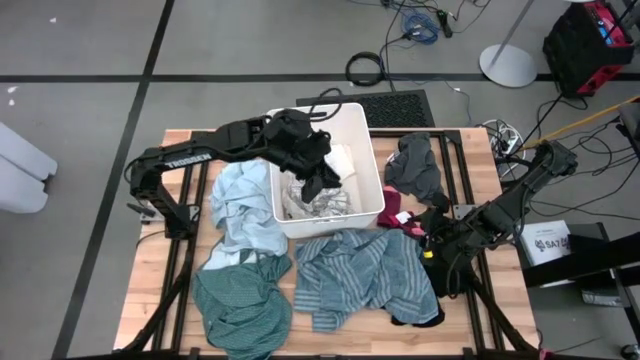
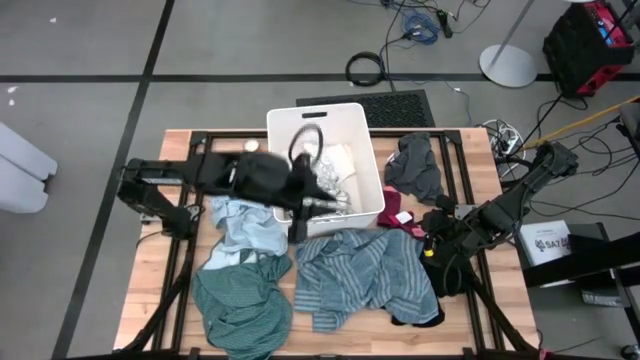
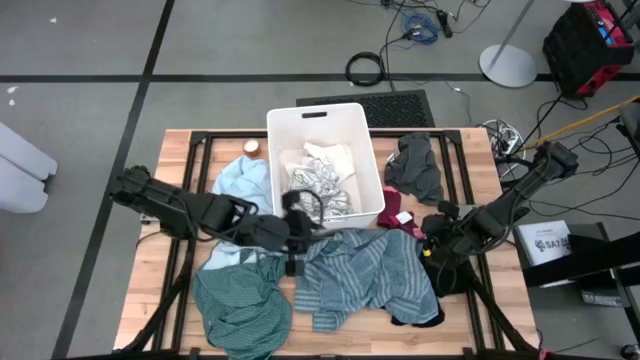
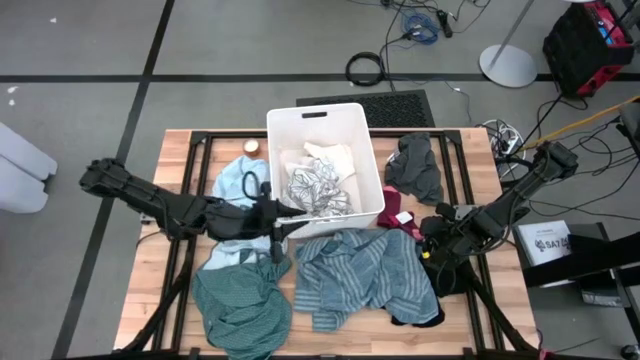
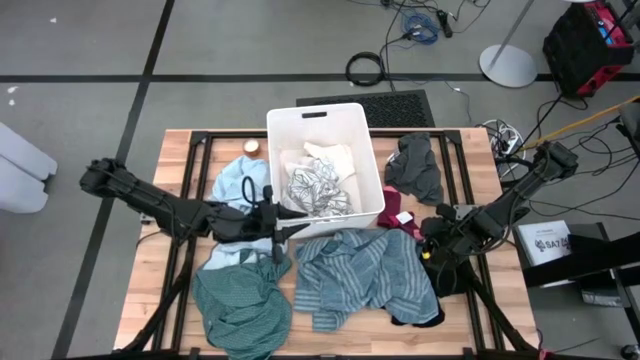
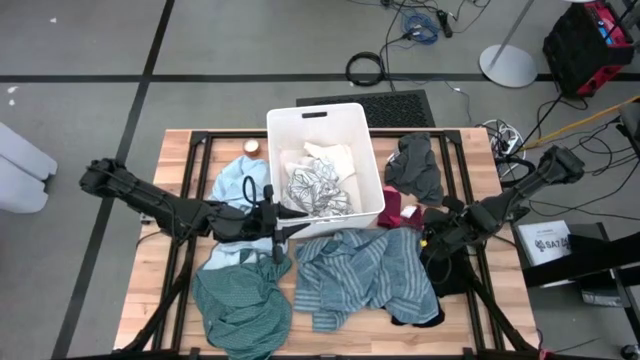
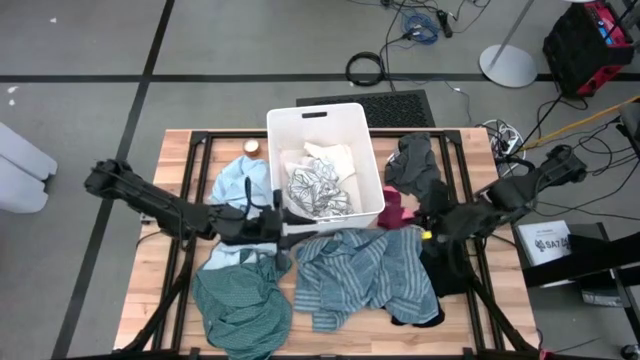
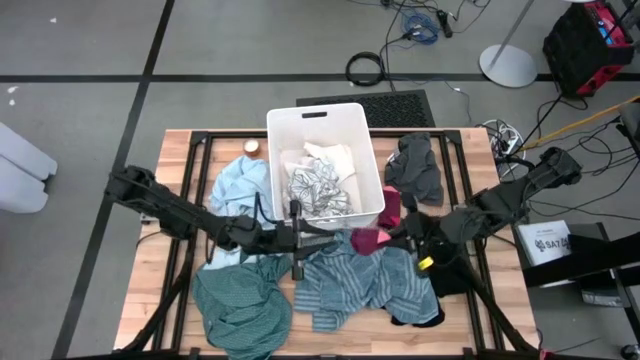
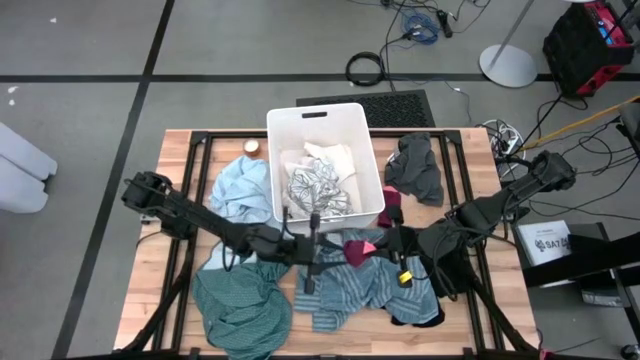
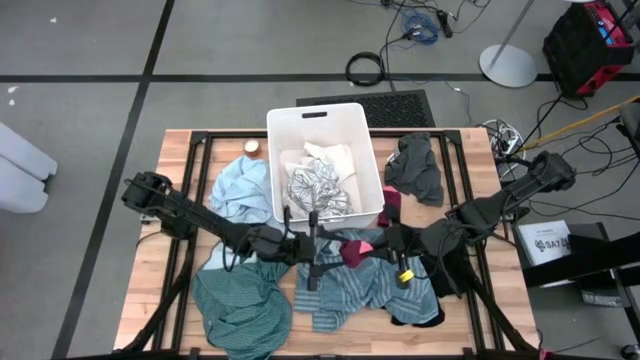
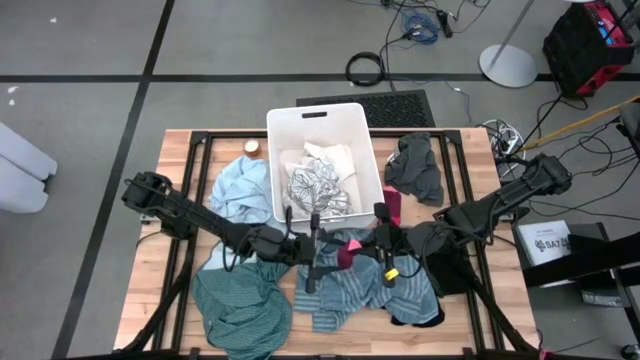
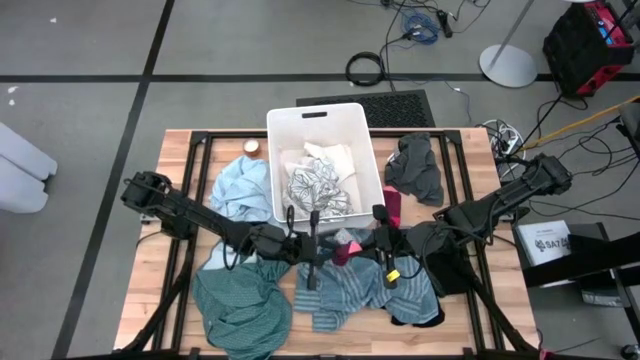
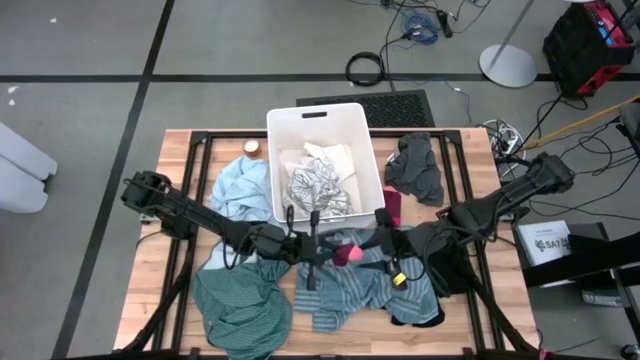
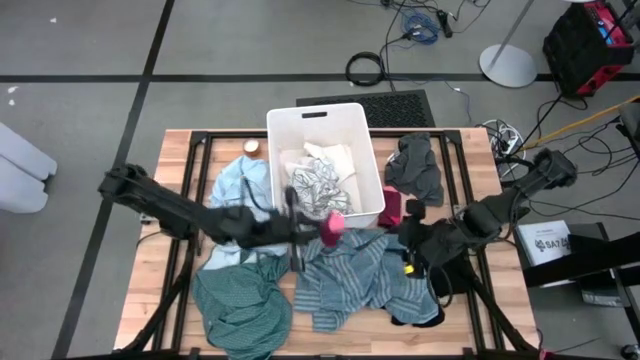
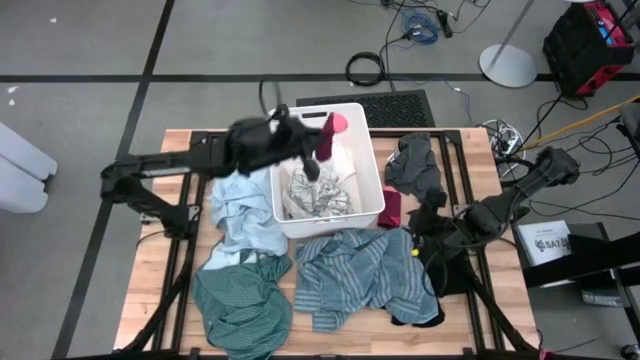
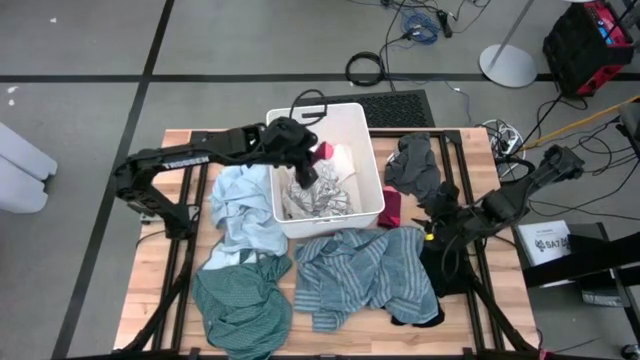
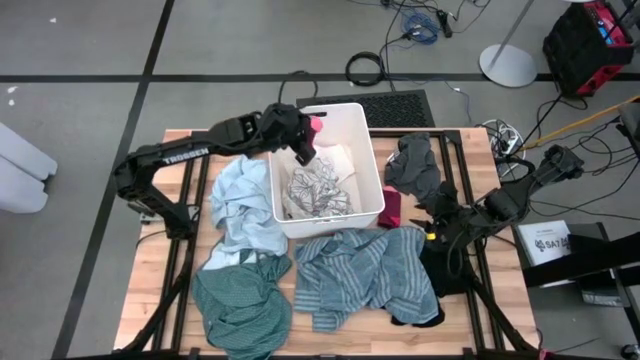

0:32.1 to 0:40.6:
Task: Sort clothes
Put the red sock into the white laundry bin

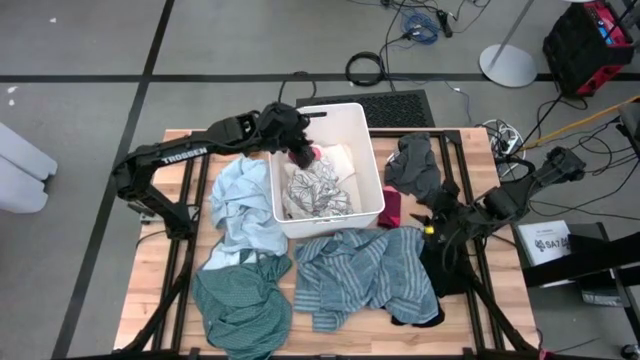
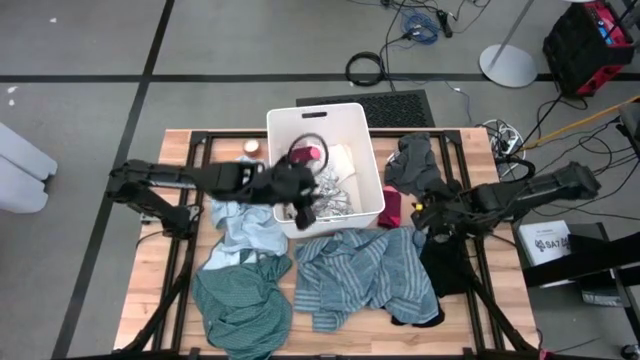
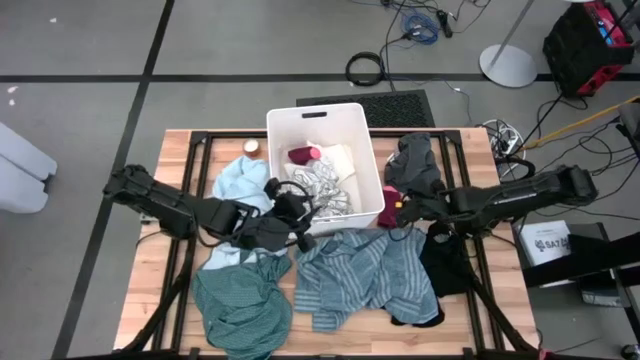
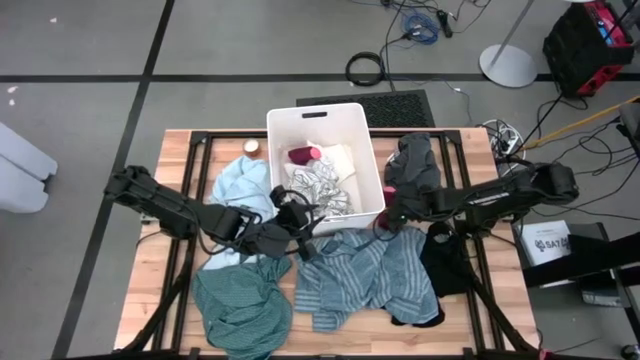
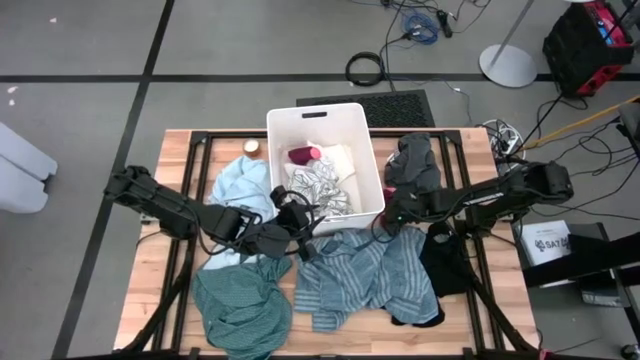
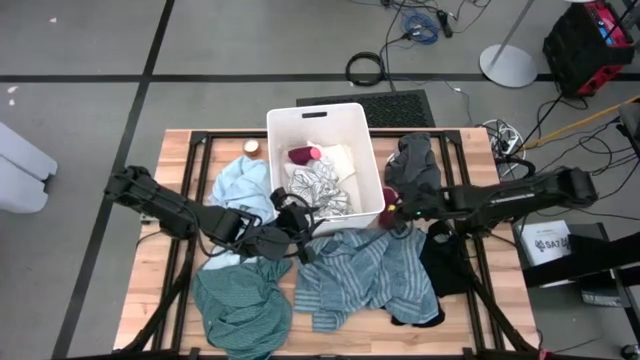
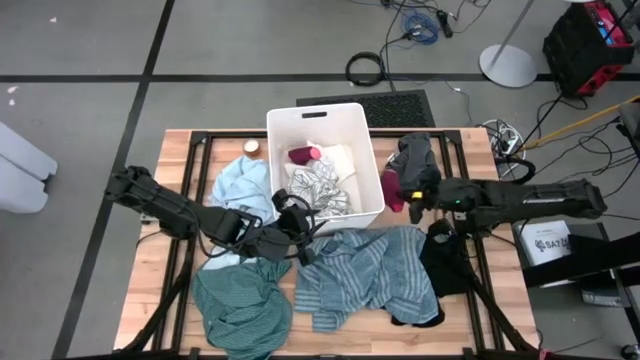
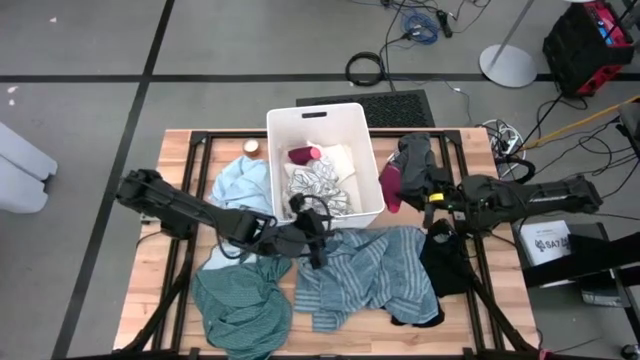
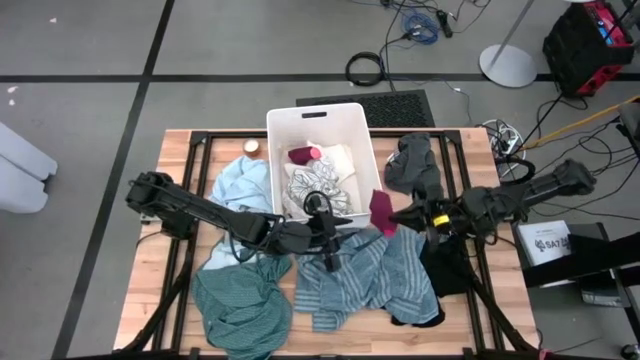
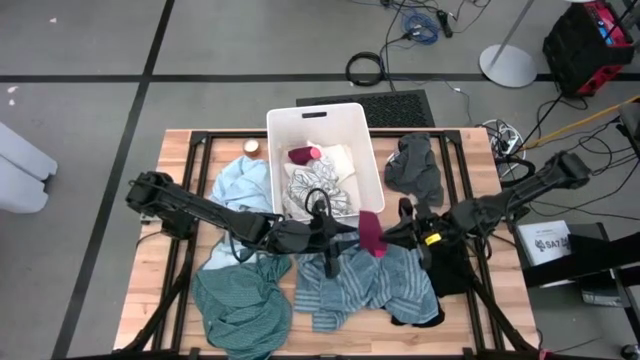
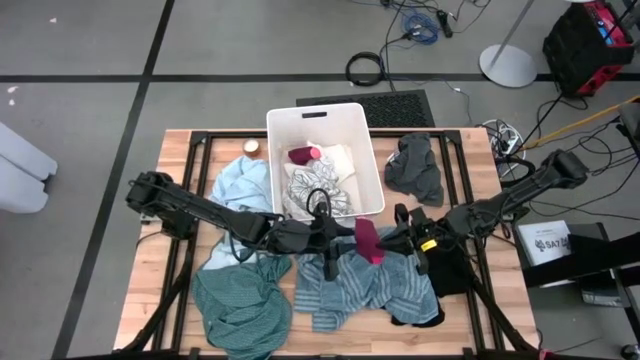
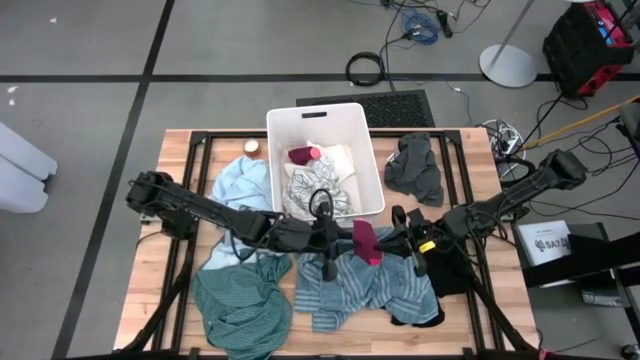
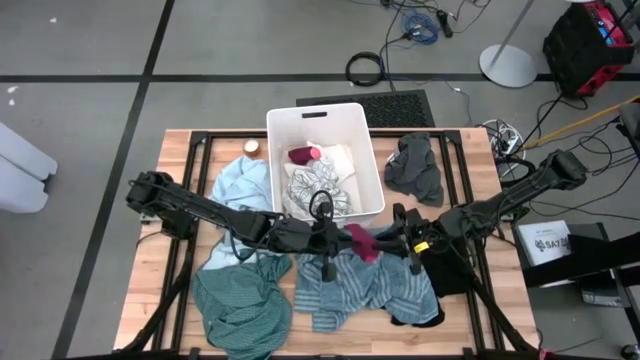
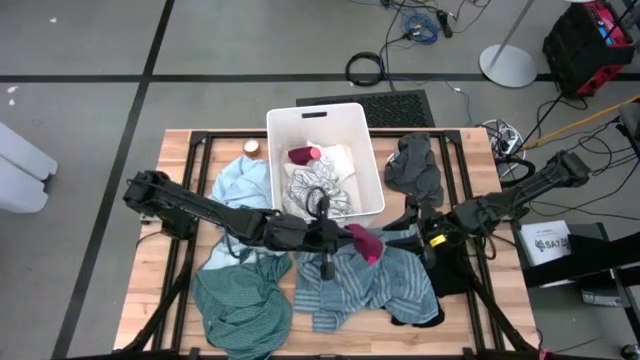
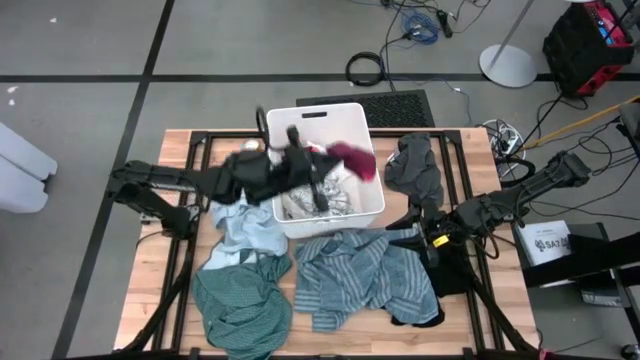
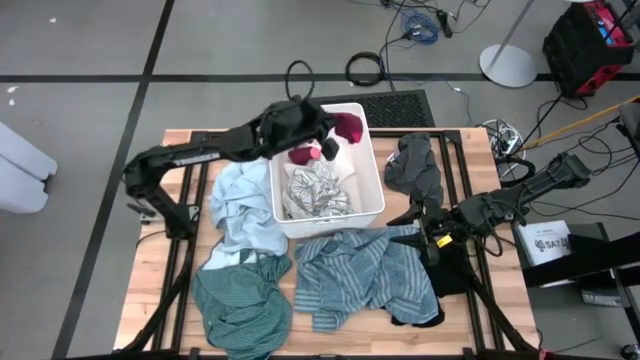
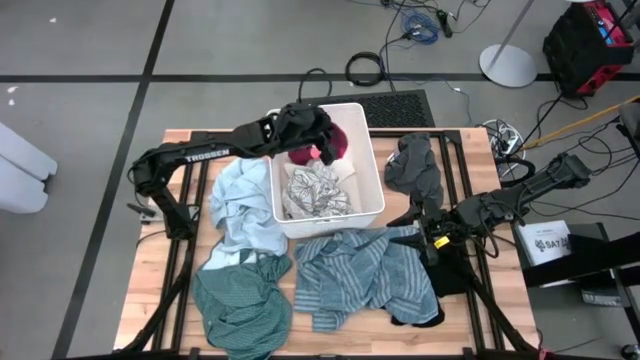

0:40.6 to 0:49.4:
Put the red sock into the white laundry bin

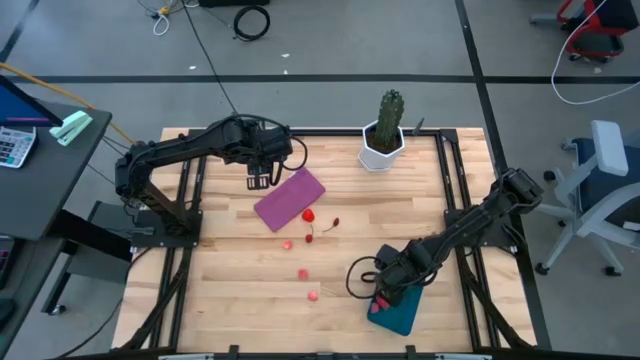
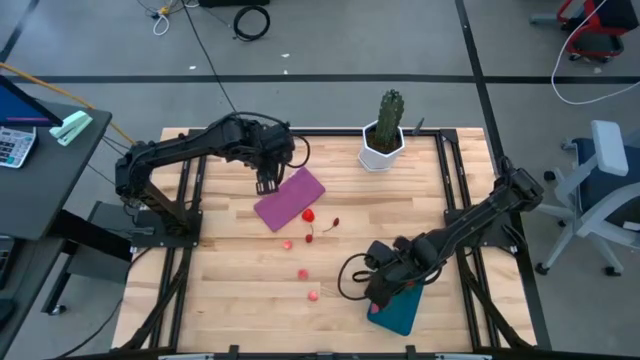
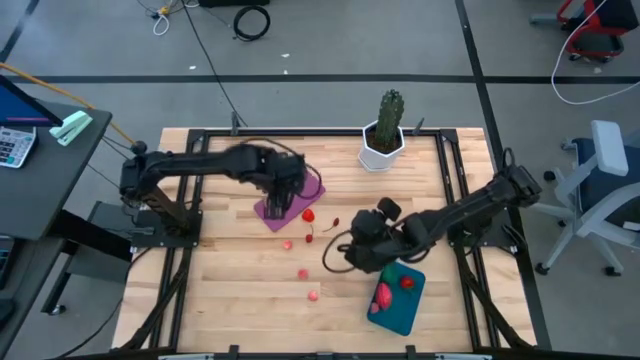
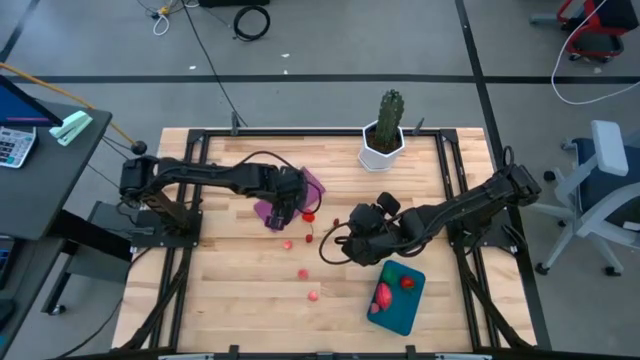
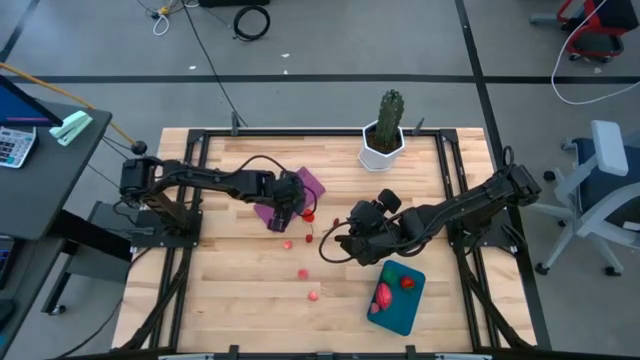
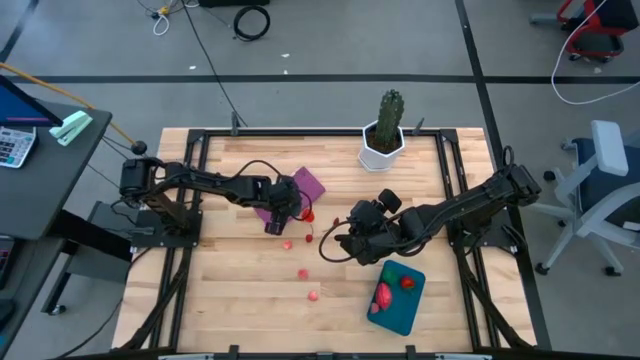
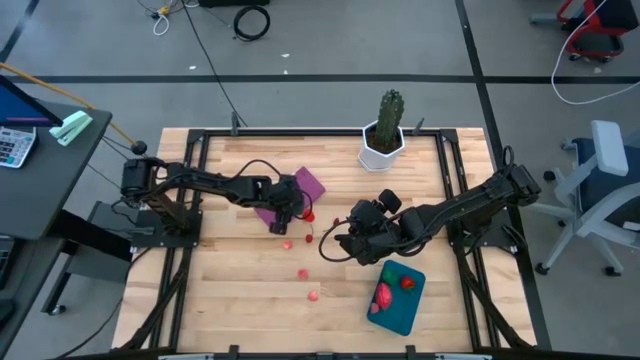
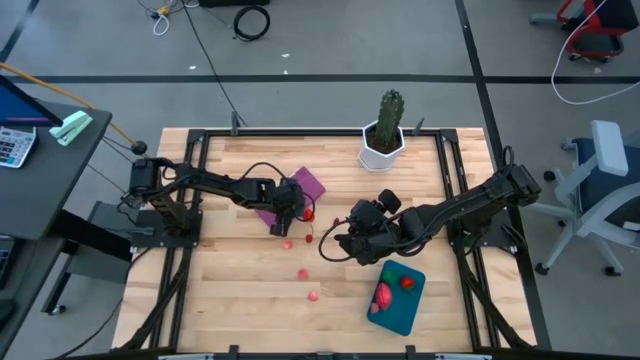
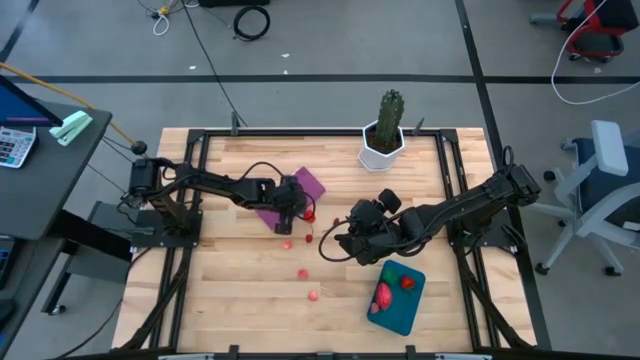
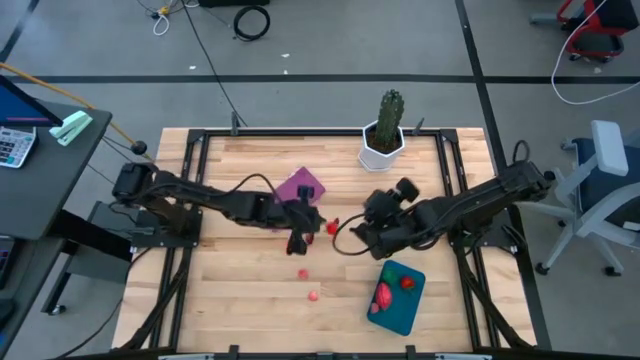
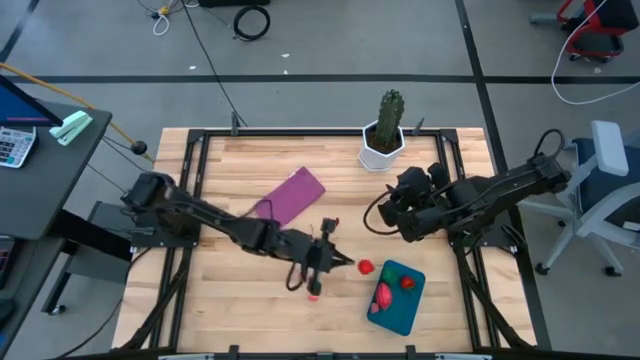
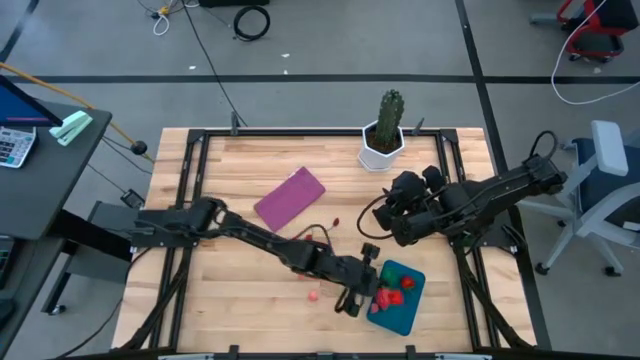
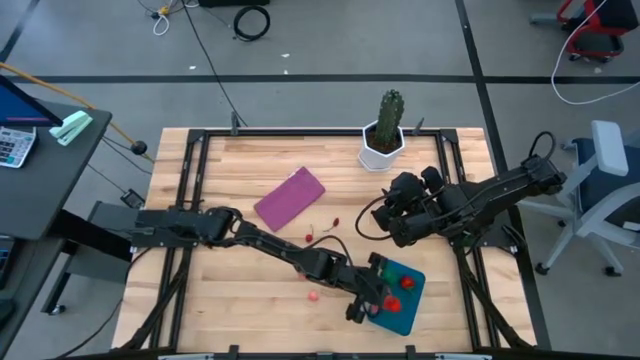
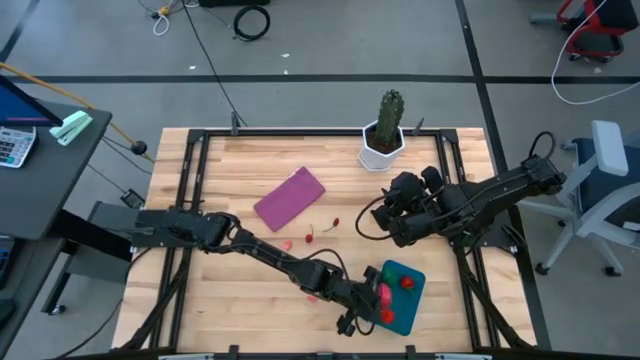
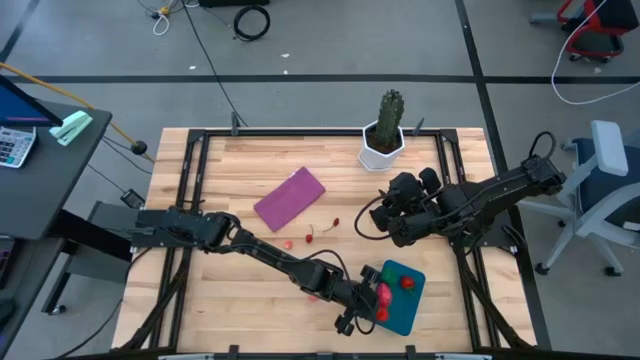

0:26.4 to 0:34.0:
Task: Pick and placing Produce into tupperware
Put the strawberry into the blue bin
